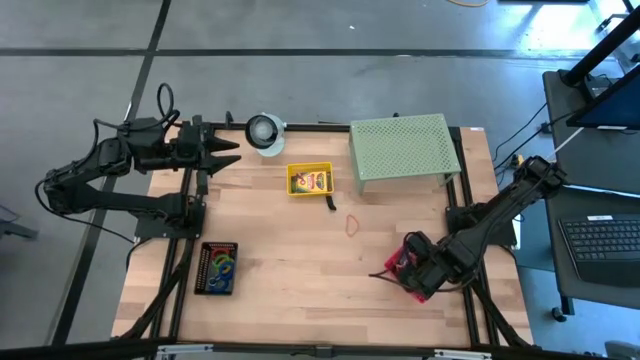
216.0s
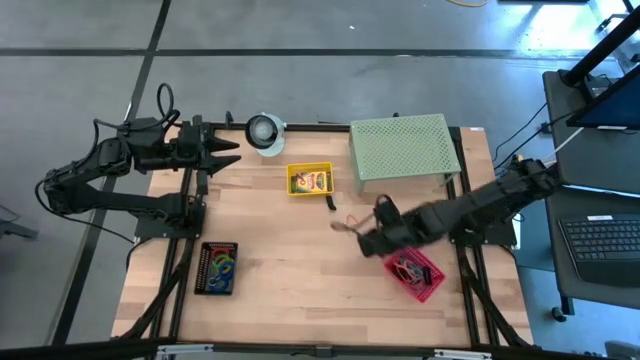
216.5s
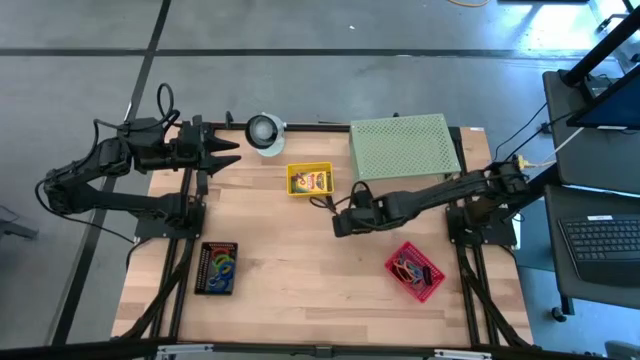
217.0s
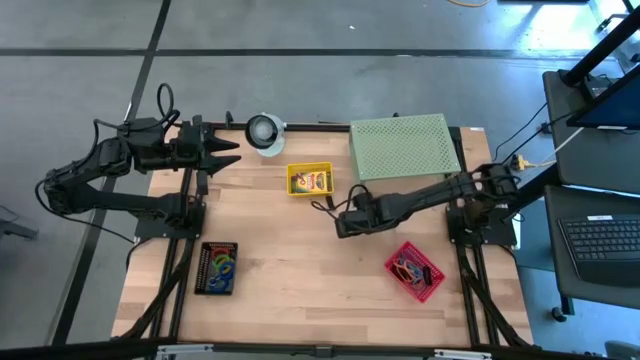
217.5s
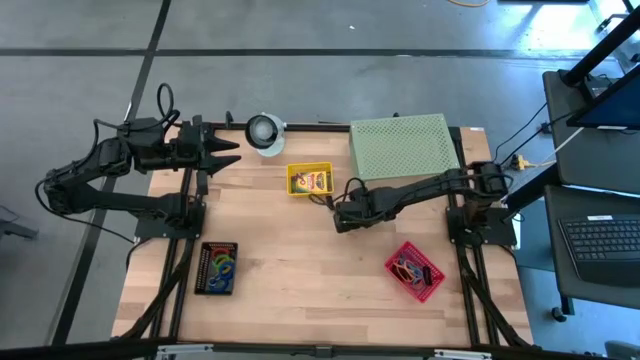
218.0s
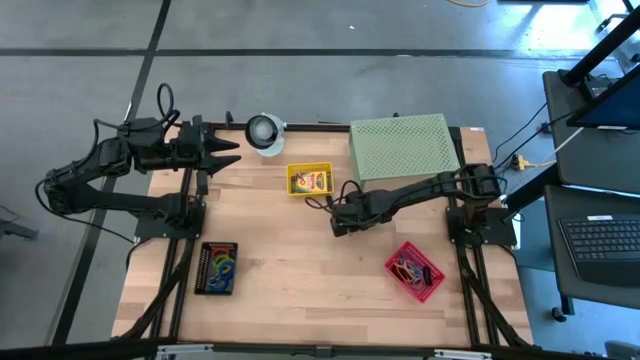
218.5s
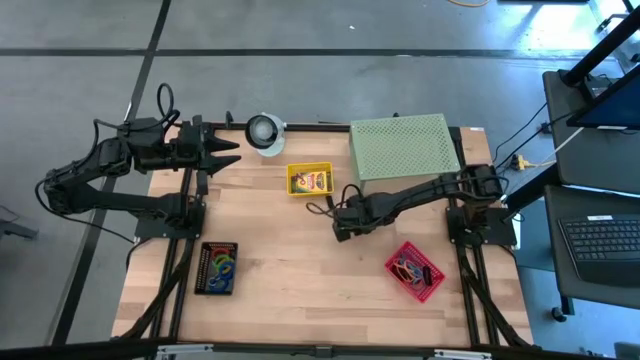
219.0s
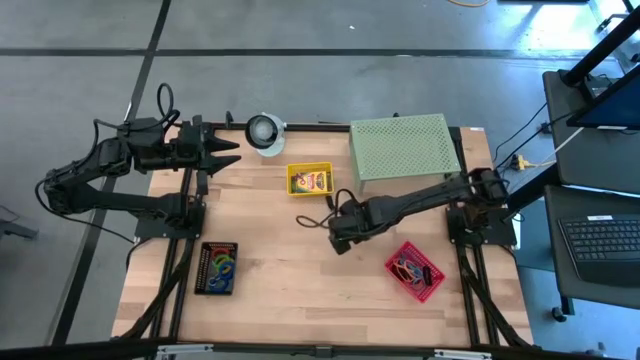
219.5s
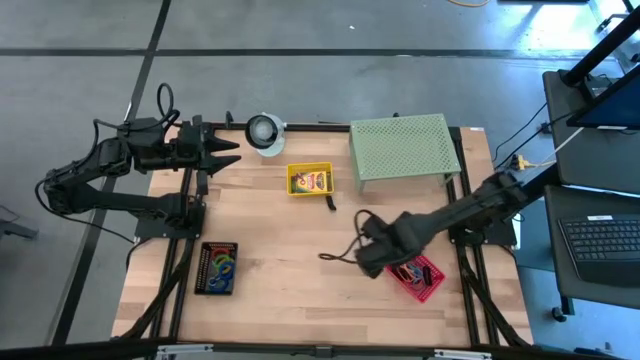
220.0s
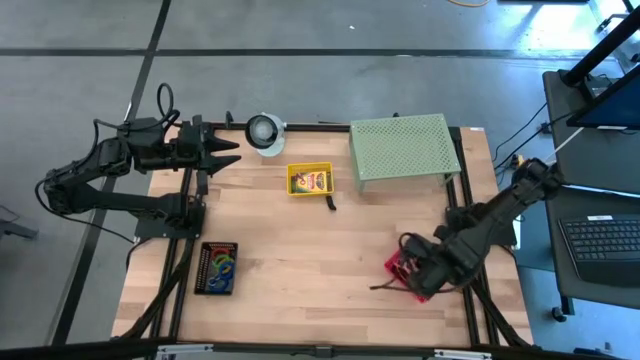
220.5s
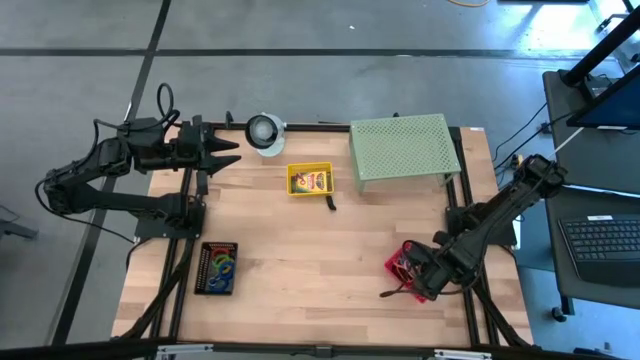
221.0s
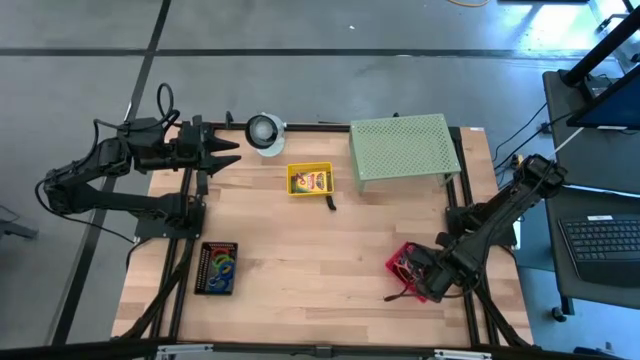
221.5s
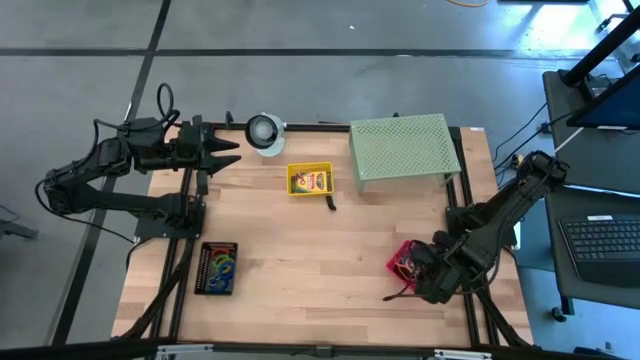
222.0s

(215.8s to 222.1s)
Task: Pick & Place Office Desk Supplies
Put the orange rubber band into the red bin

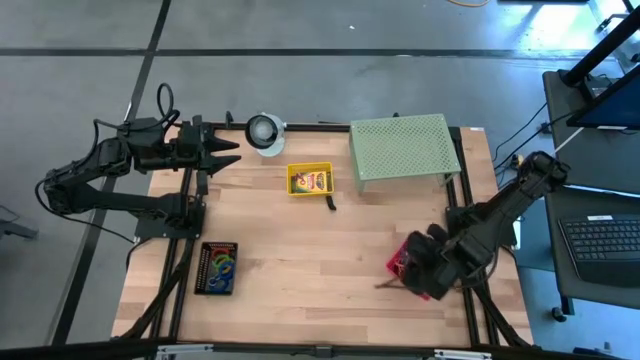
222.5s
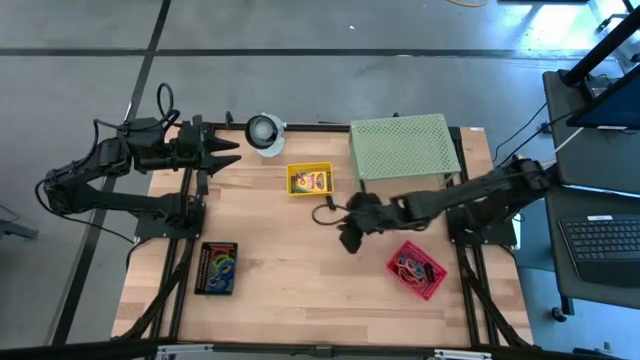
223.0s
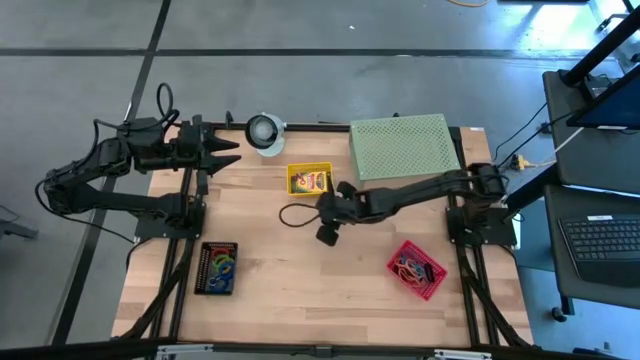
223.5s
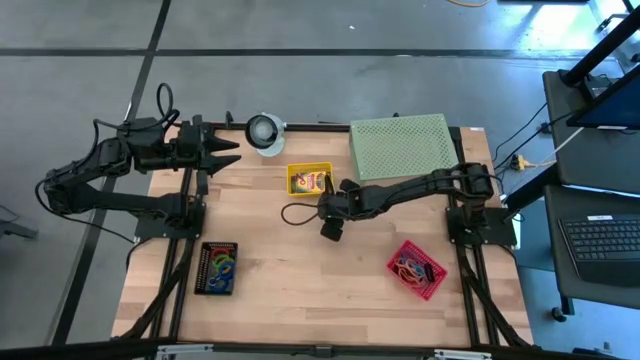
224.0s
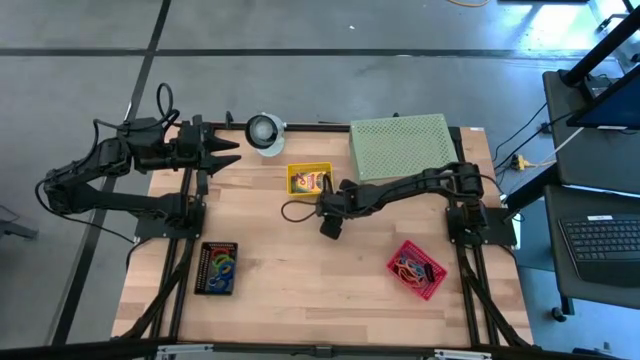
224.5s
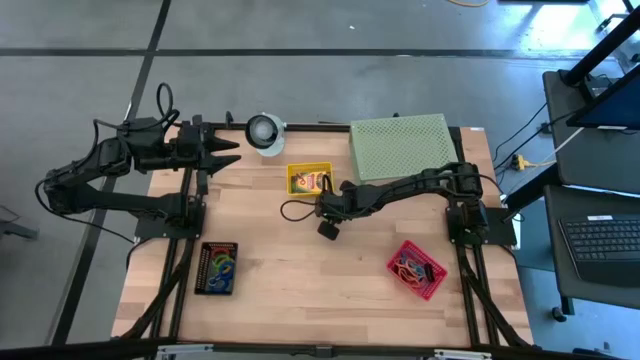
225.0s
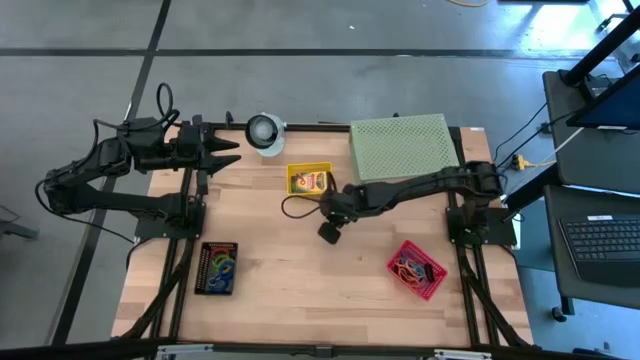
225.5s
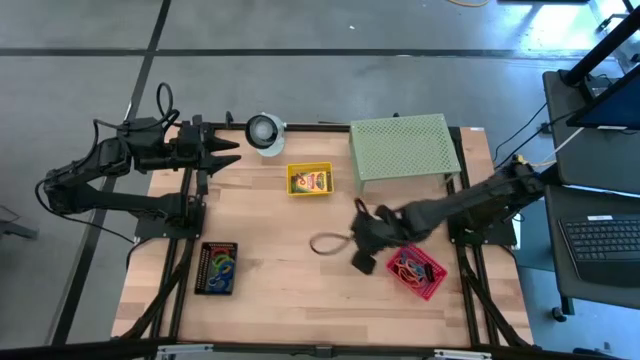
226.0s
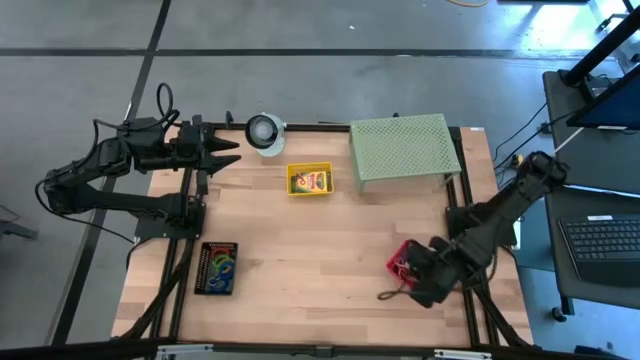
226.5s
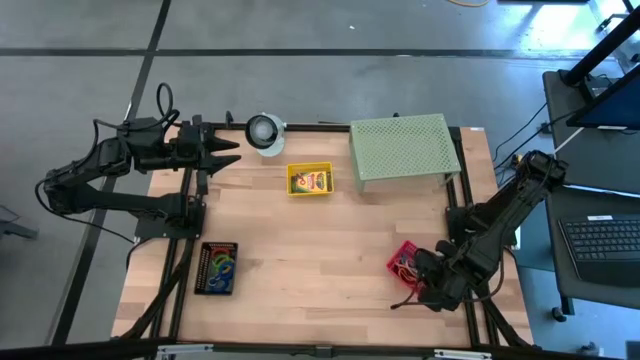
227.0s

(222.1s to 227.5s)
Put the black rubber band into the red bin

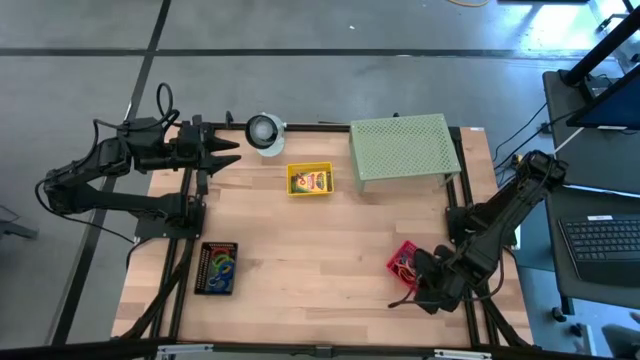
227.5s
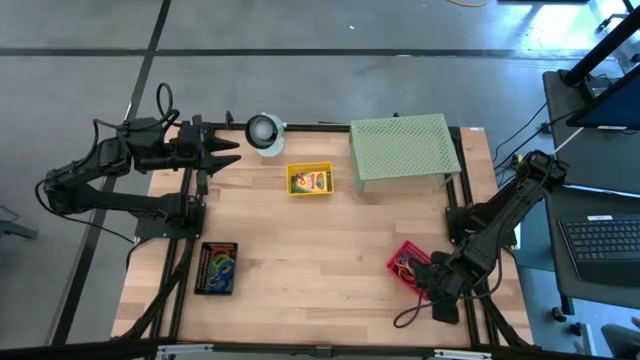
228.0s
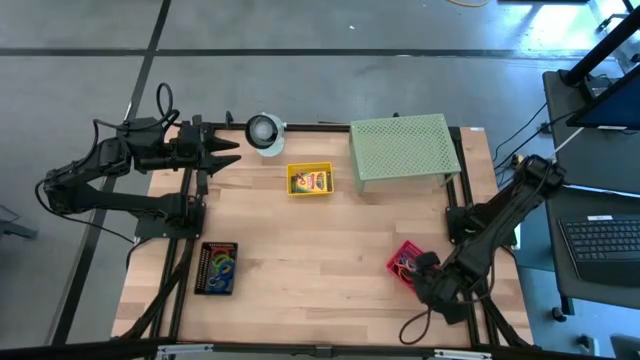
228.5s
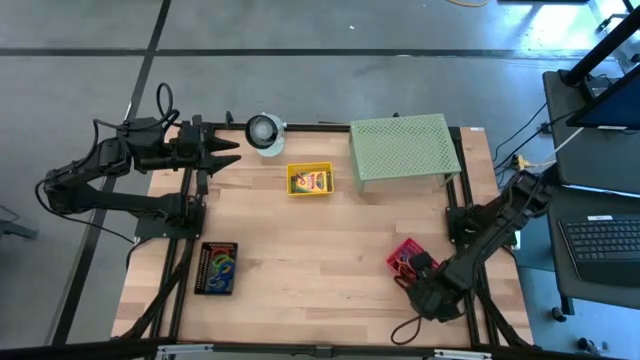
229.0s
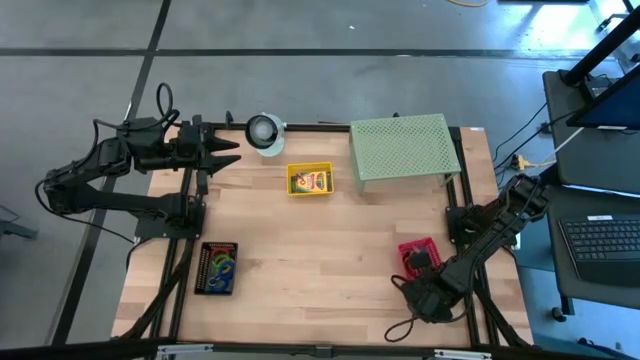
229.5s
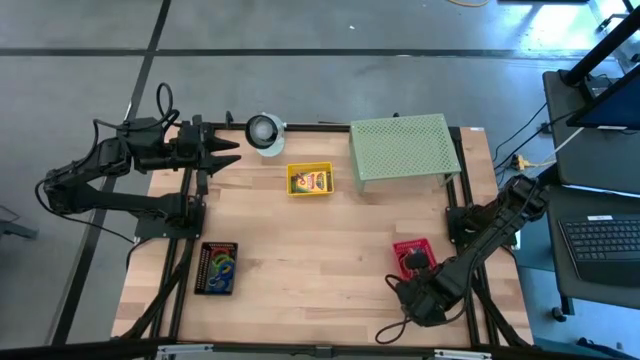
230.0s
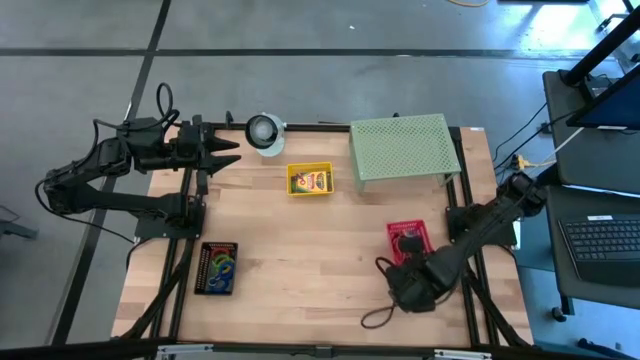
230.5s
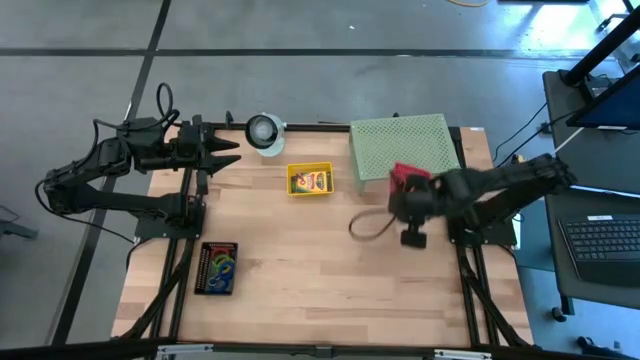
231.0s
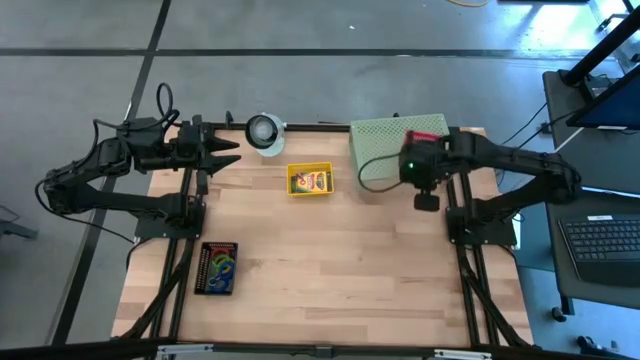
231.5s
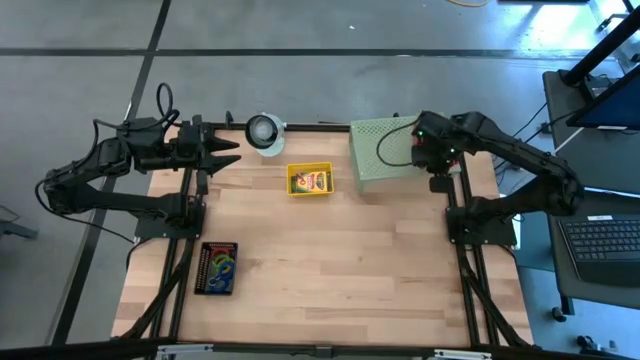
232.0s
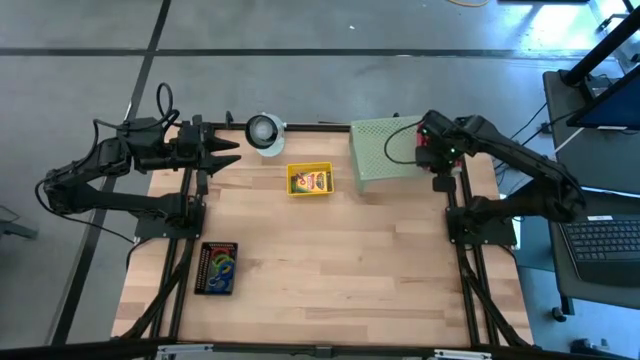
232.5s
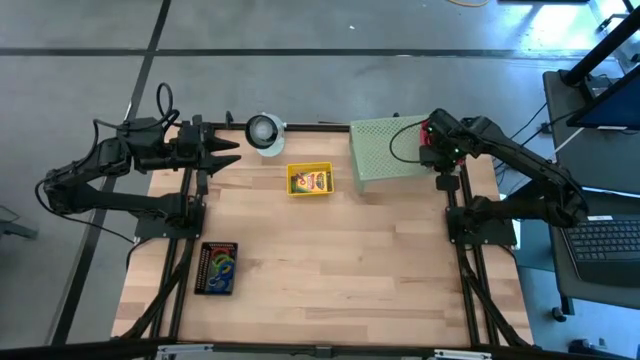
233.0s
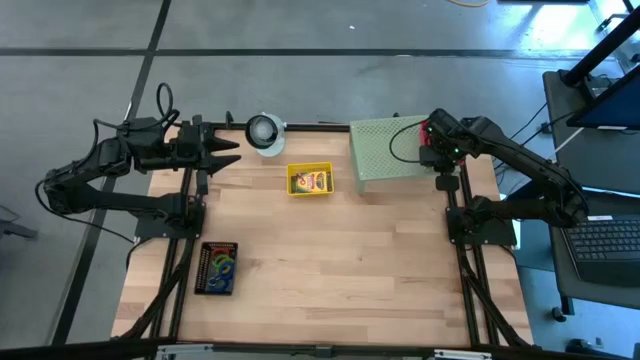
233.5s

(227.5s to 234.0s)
Put the red bin filled with rubber bands on the shelf

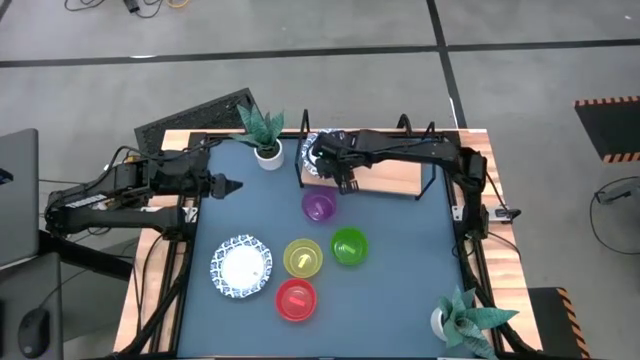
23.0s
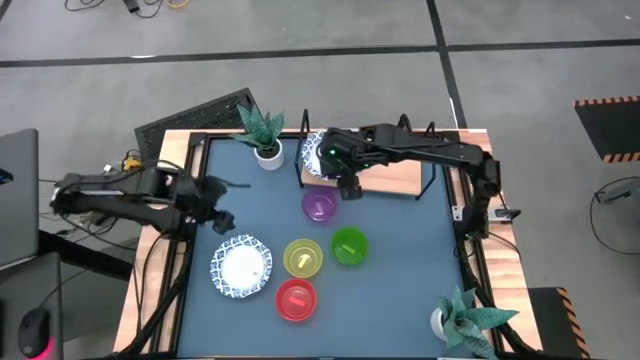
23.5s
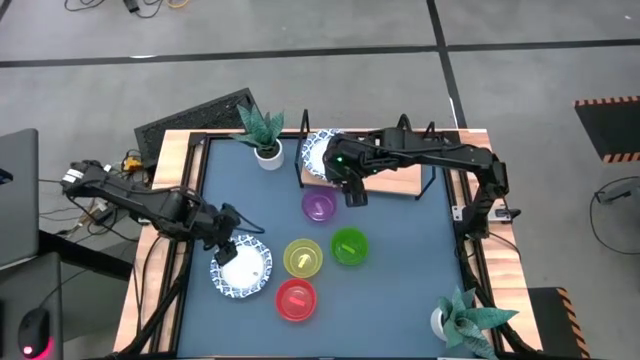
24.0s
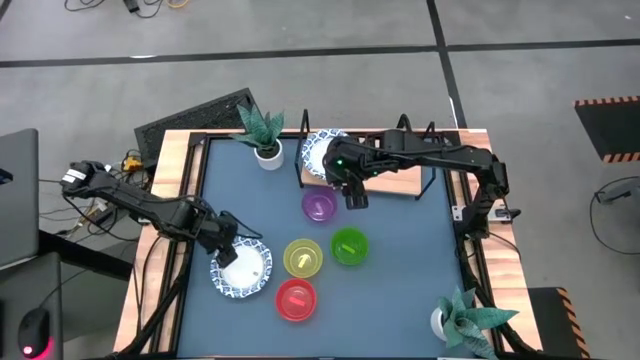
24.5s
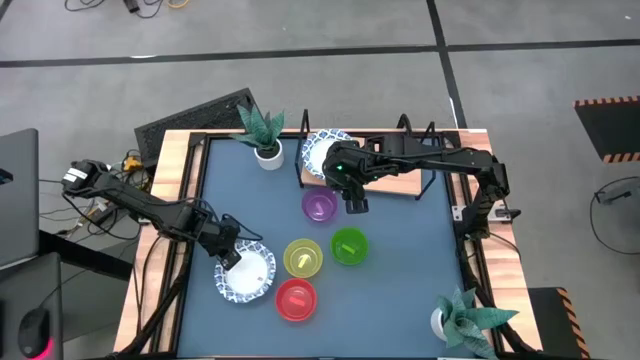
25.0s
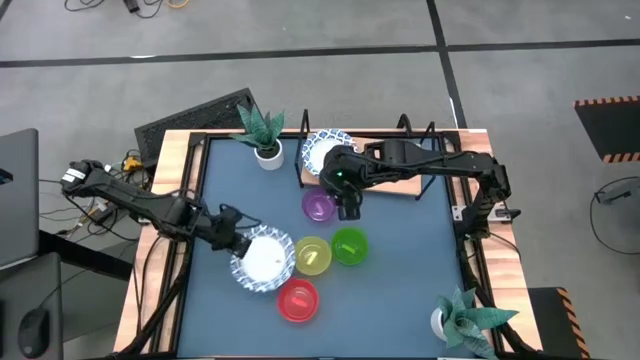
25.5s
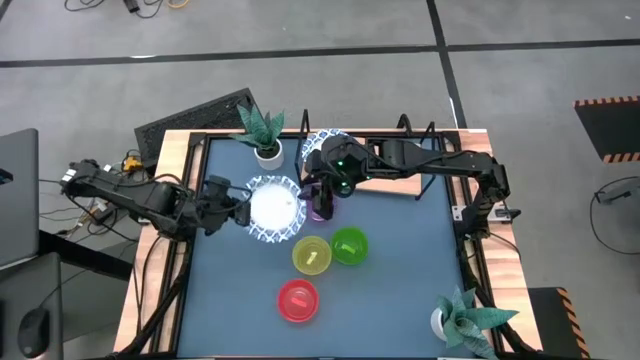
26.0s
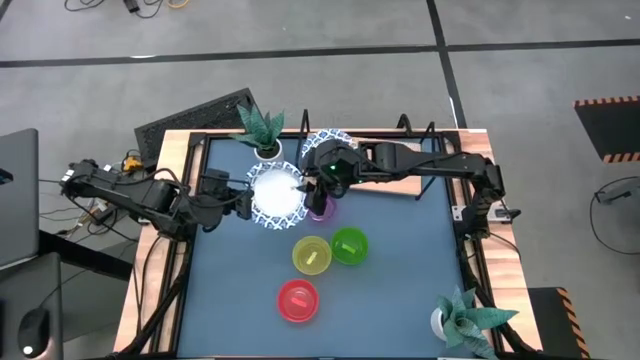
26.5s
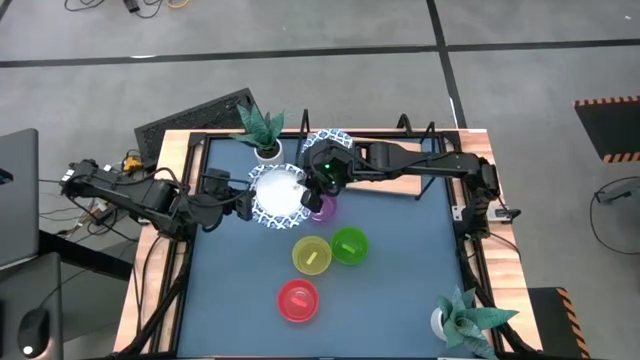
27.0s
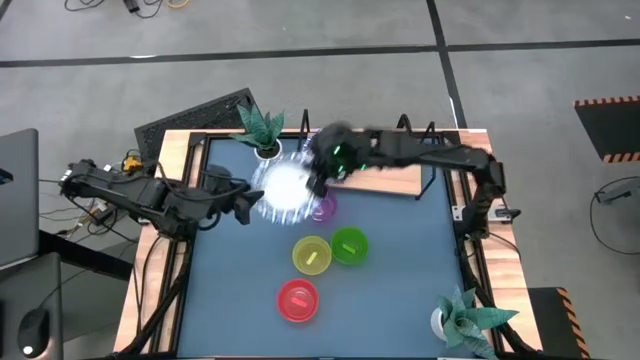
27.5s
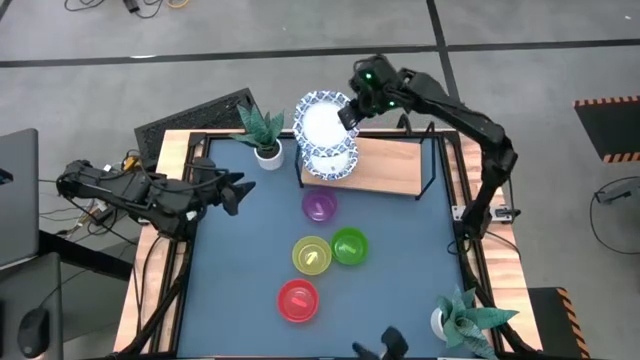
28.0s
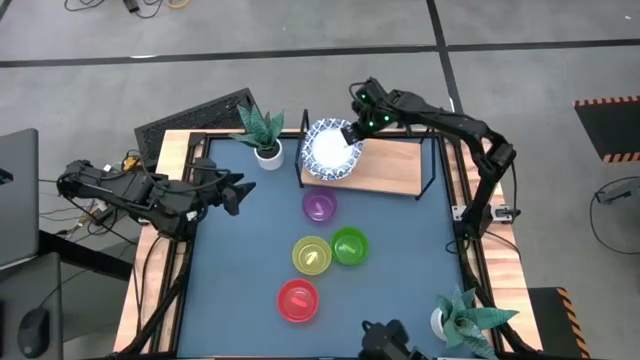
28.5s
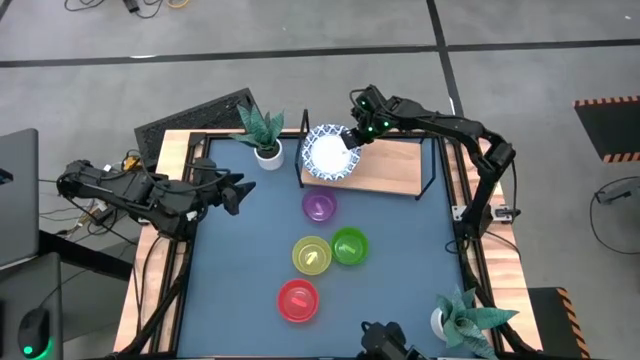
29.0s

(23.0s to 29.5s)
Task: Place and stack bowls onto a shelf
Stack the white bowl on top of the white bowl on the shelf
